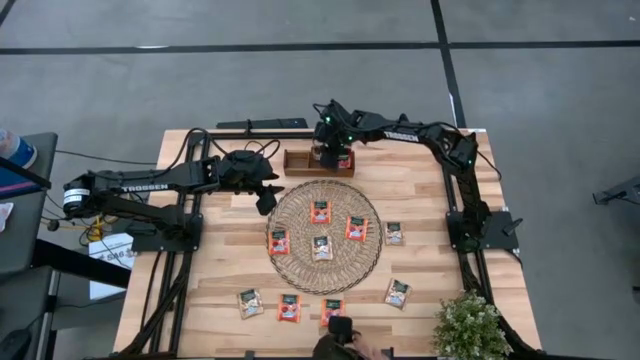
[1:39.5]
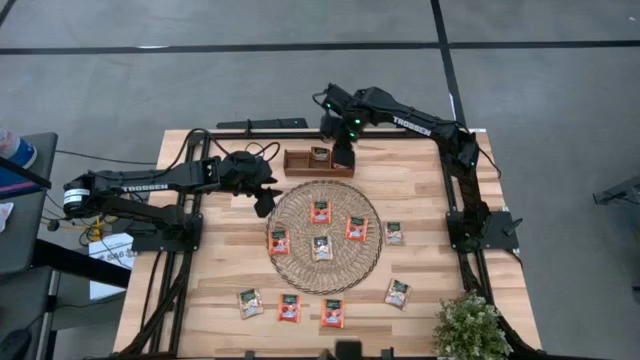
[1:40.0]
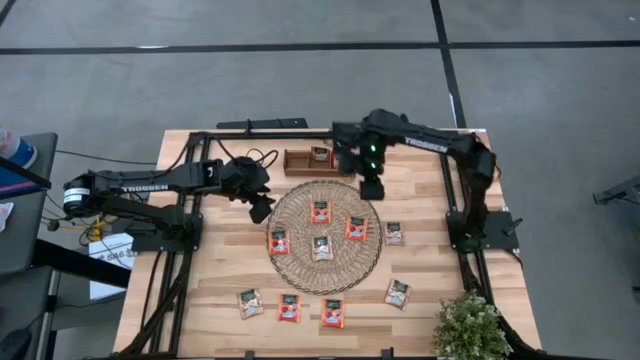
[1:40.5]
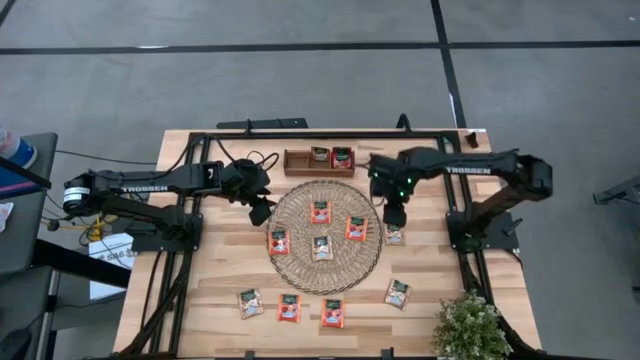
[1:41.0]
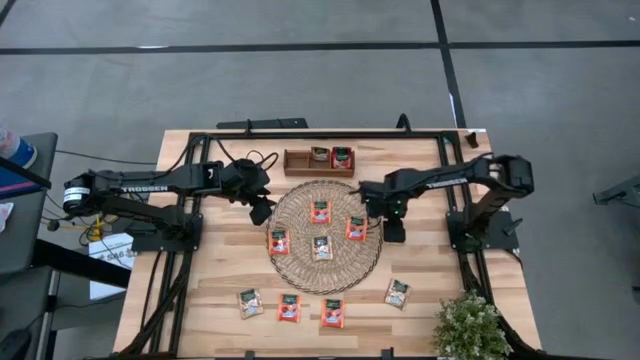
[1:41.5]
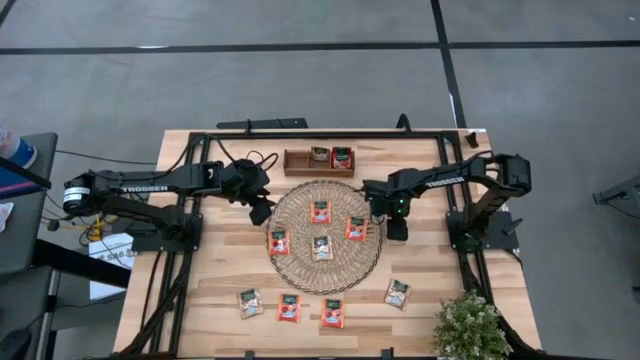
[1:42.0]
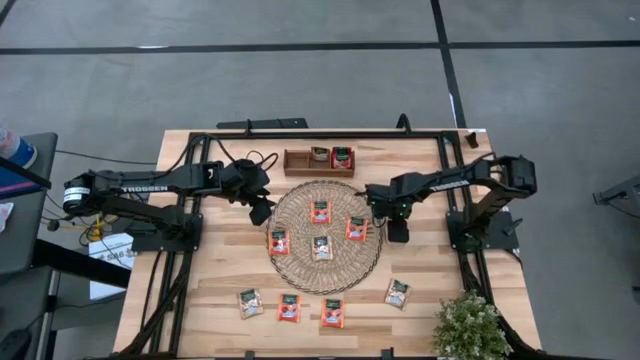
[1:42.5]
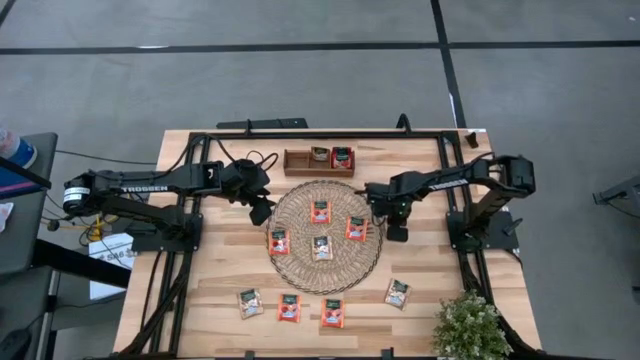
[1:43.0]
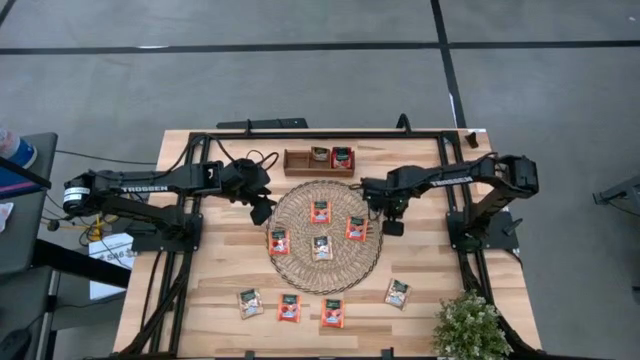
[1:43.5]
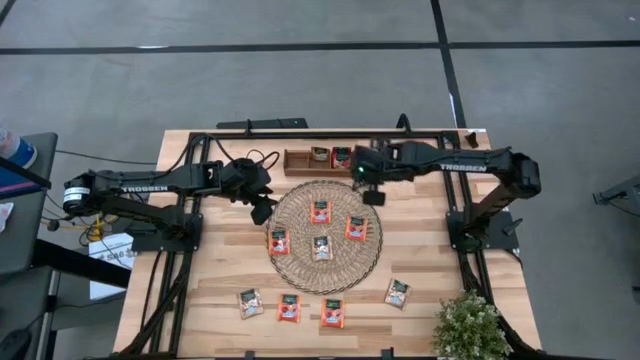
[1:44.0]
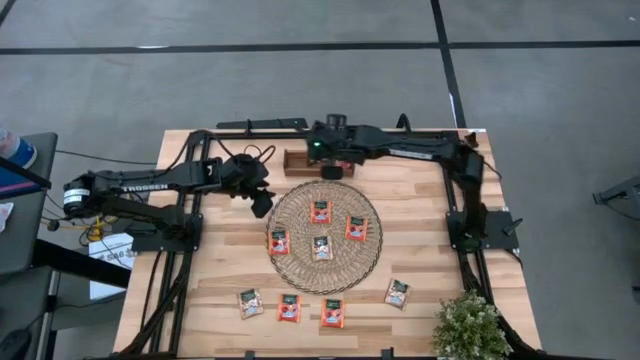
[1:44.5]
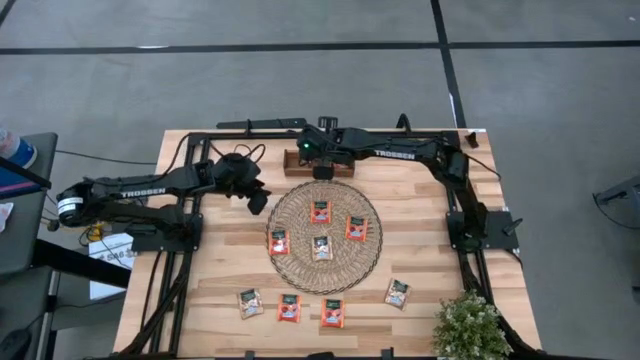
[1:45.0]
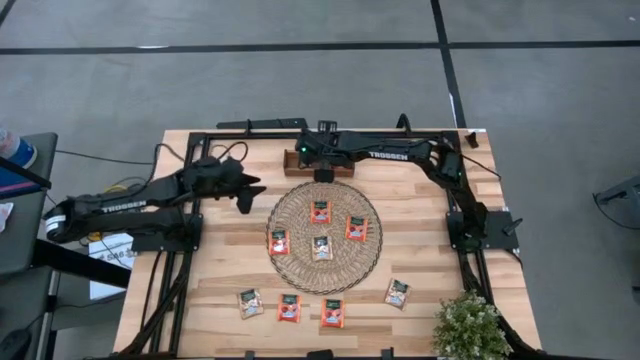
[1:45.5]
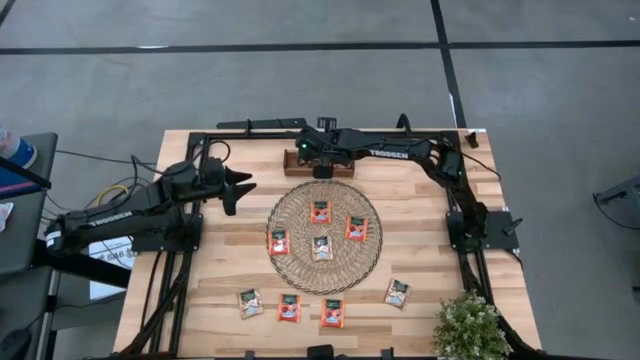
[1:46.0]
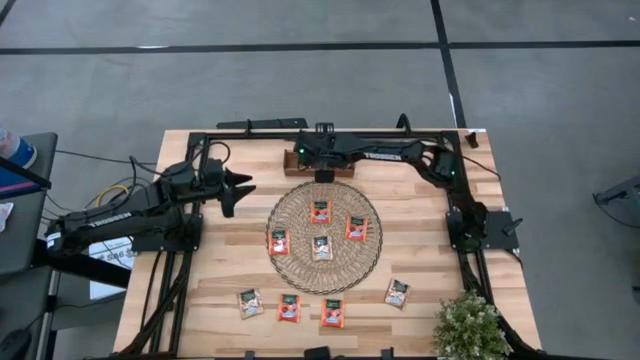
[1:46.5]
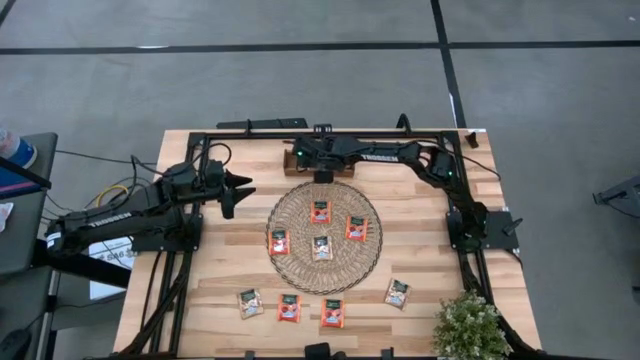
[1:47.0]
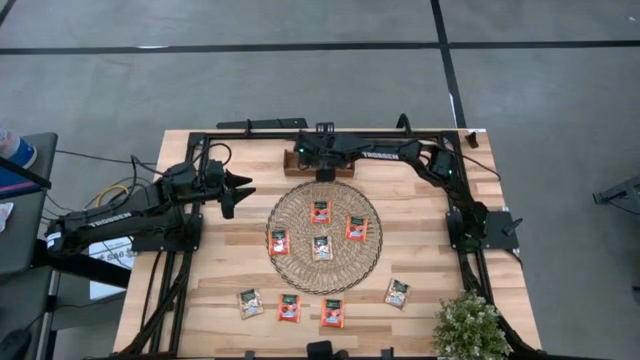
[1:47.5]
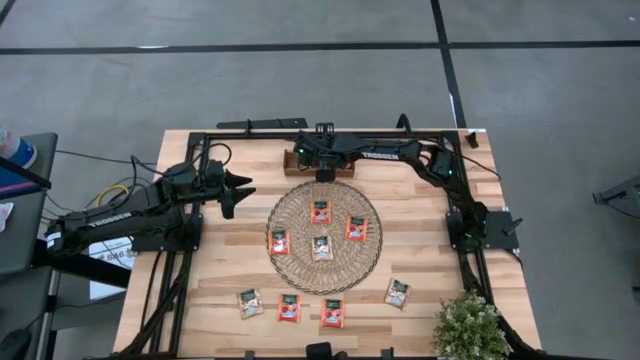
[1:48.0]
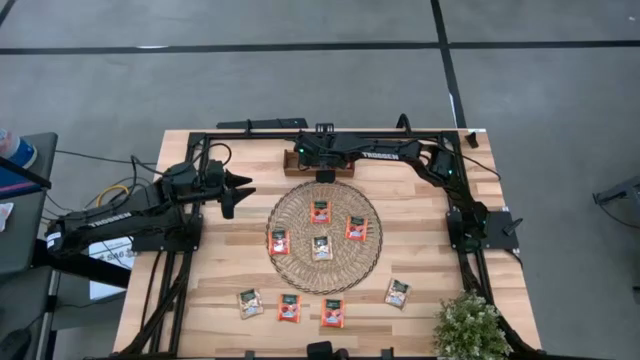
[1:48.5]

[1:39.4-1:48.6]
Task: Pick & Place Tea
Put the brown tea bag into the middle section of the wooden organizer

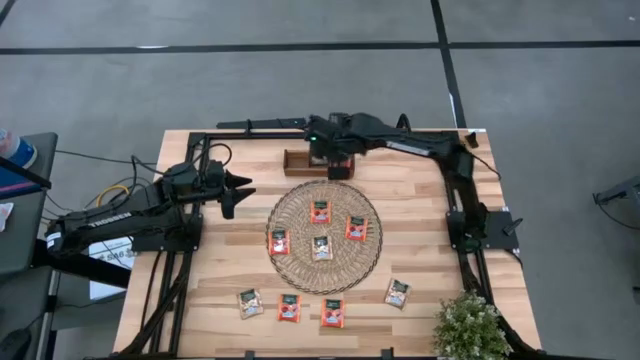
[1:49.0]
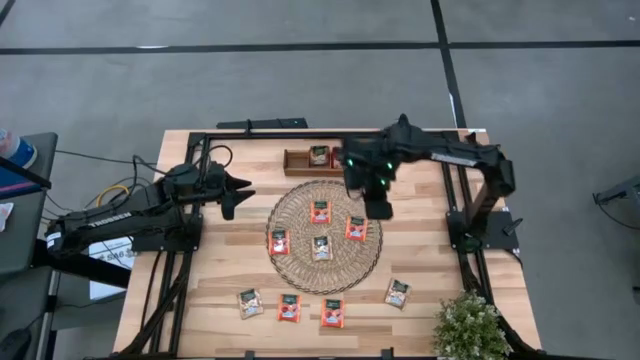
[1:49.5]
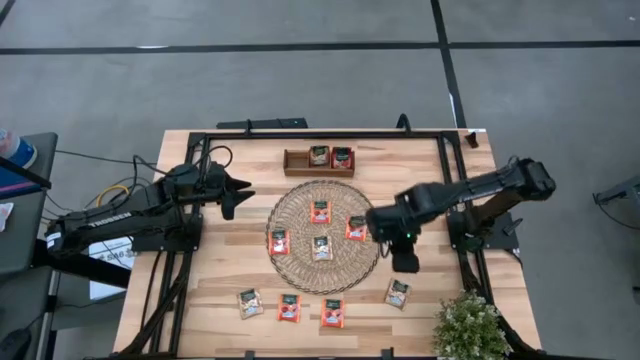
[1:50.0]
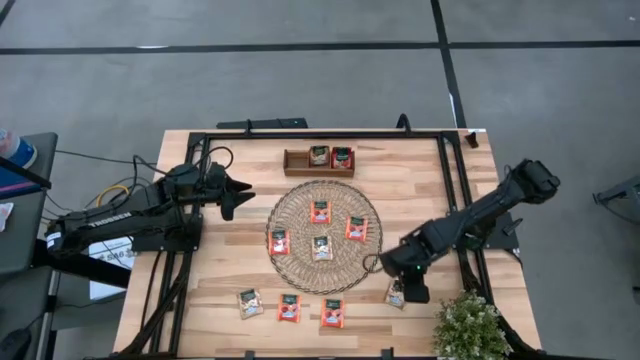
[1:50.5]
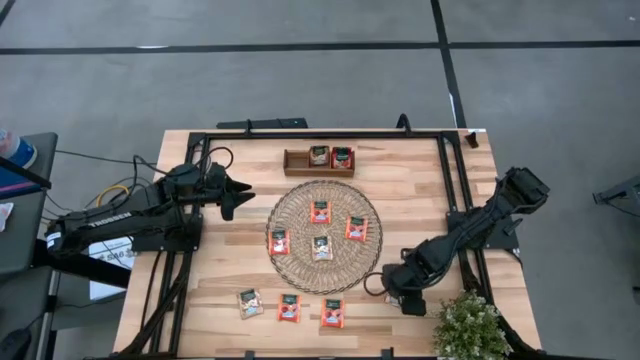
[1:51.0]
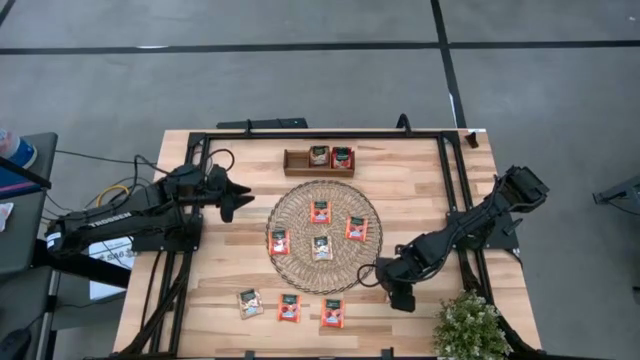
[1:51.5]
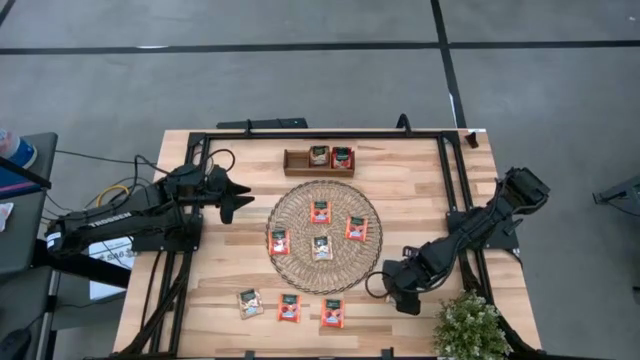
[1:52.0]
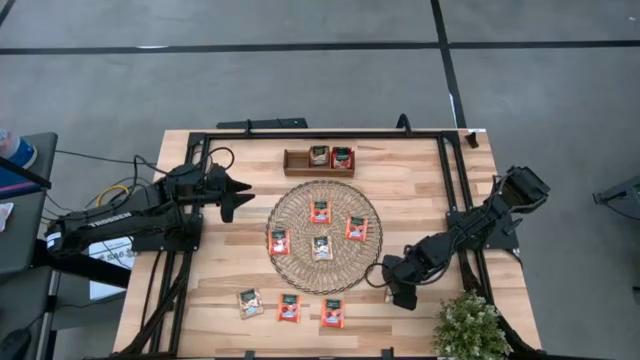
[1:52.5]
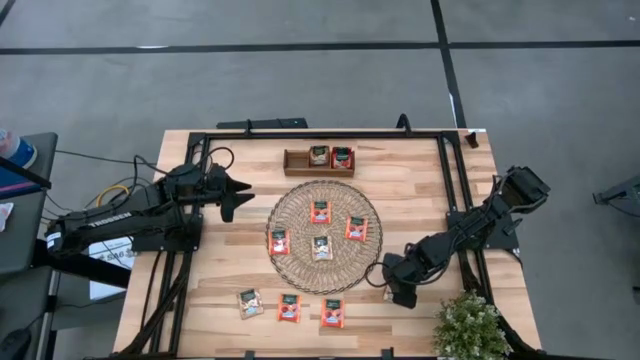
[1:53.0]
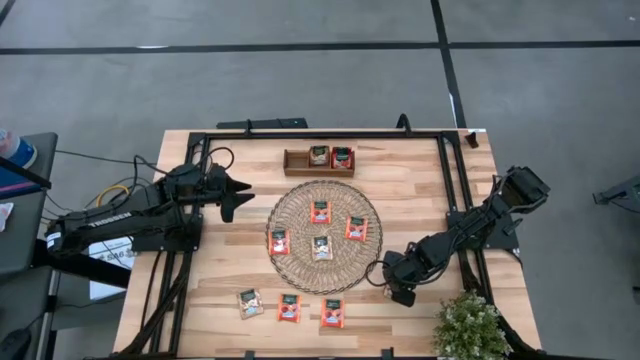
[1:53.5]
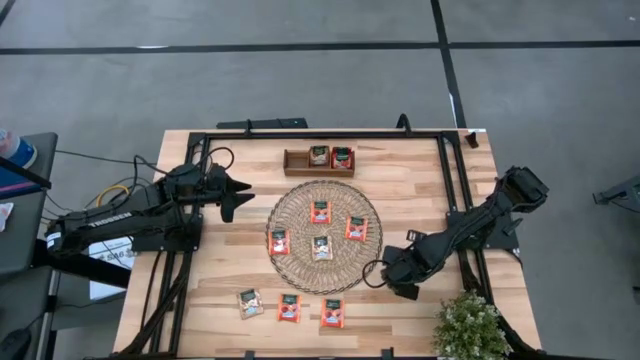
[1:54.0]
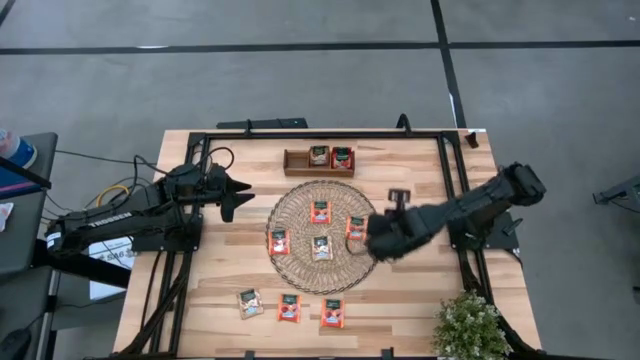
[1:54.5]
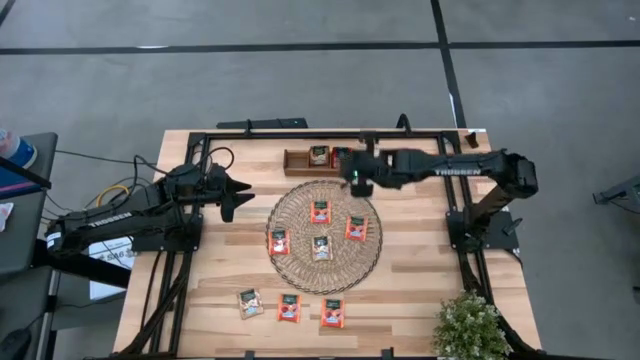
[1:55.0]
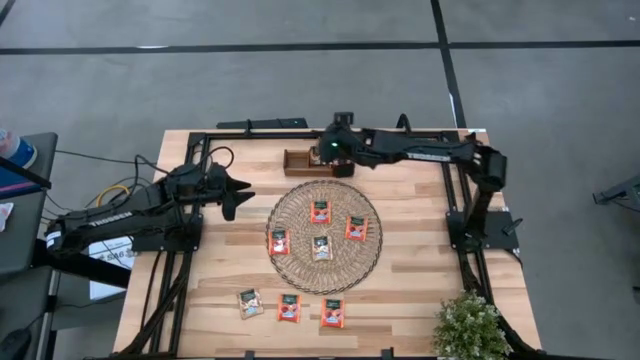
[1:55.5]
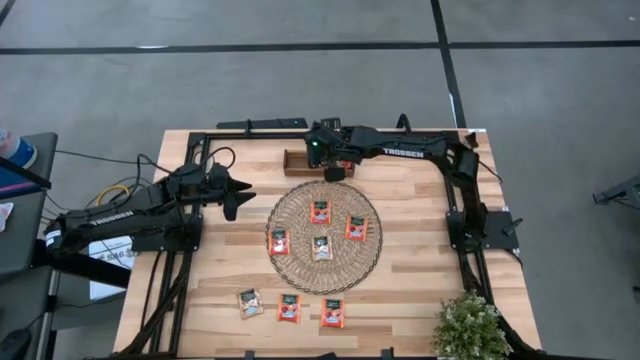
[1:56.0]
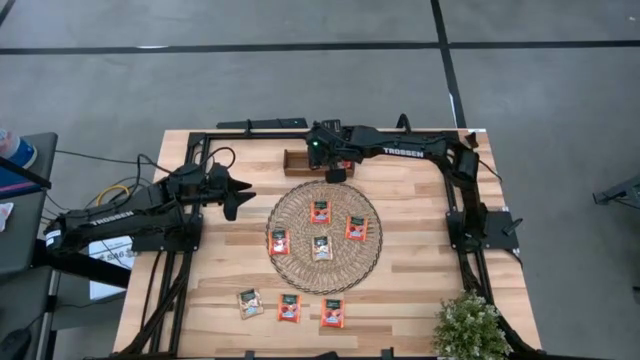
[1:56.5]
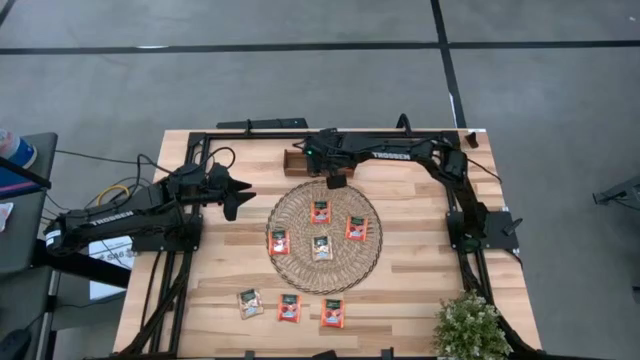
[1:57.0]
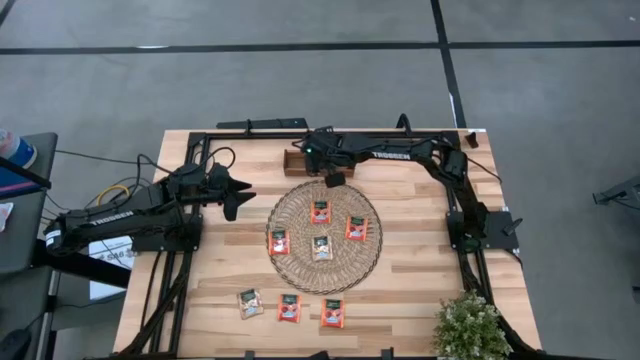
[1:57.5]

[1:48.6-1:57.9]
Put the brown tea bag into the middle section of the wooden organizer

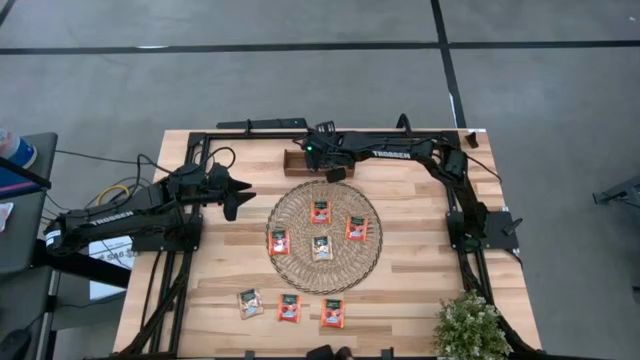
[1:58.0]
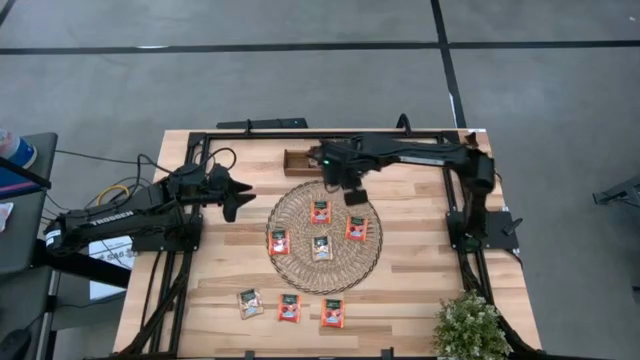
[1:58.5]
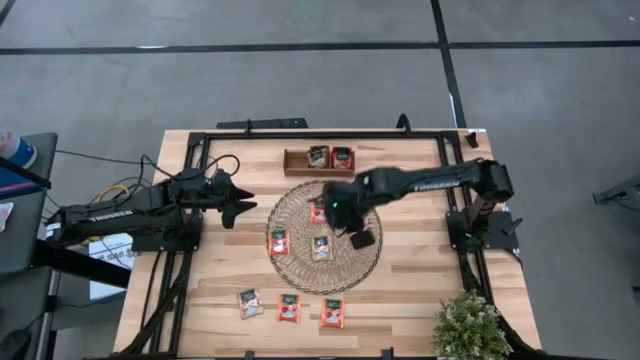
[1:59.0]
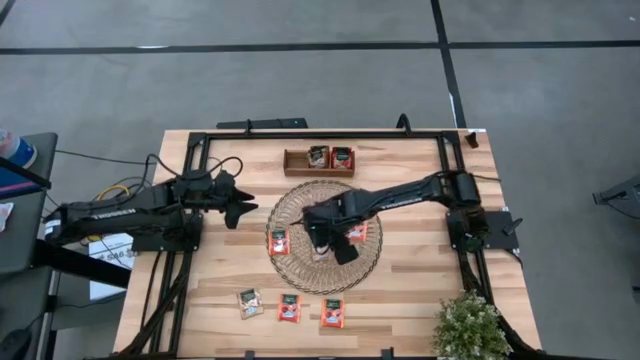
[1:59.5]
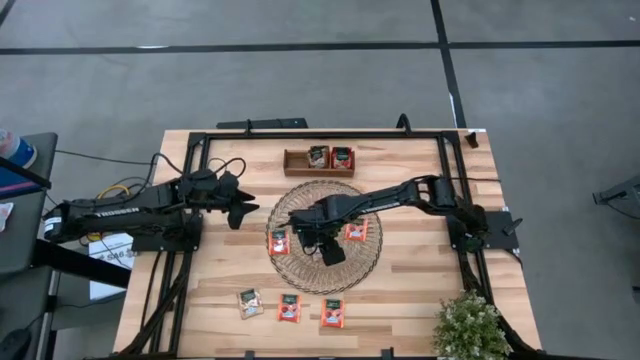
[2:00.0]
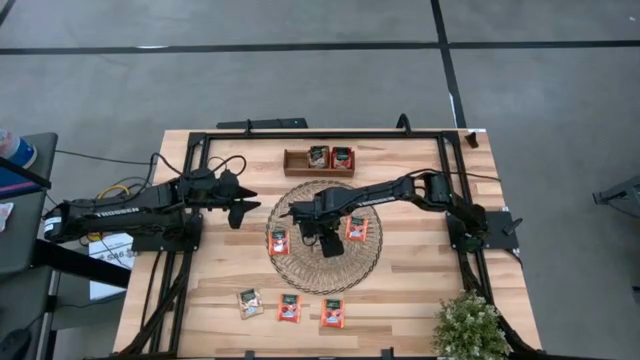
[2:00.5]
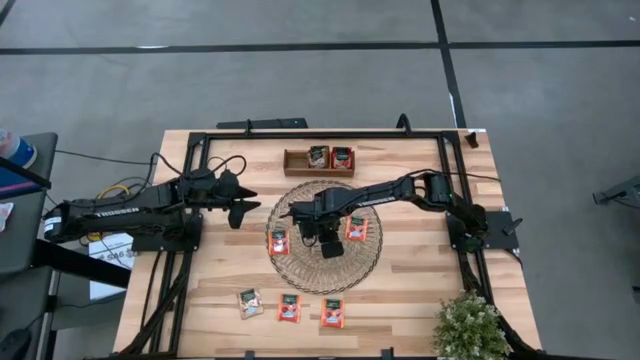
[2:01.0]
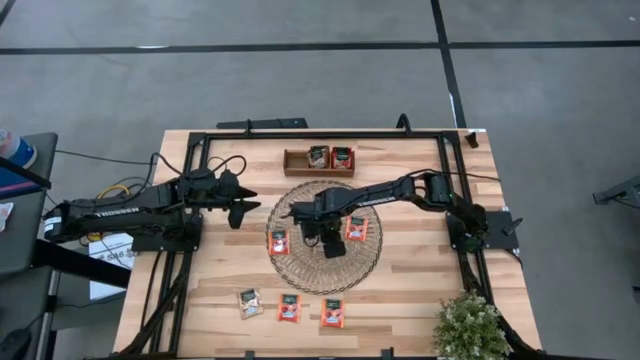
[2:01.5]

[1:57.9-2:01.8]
Put the brown tea bag into the middle section of the wooden organizer
